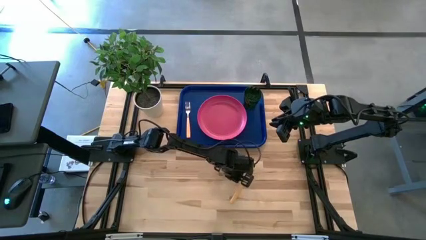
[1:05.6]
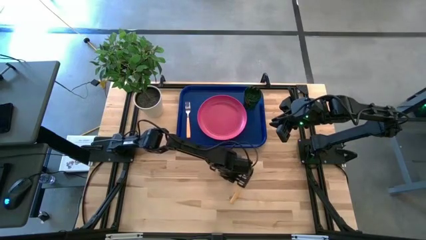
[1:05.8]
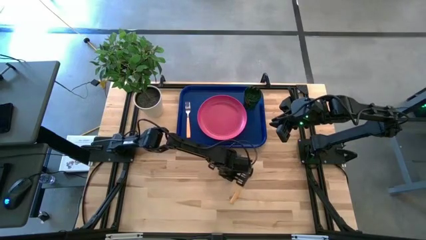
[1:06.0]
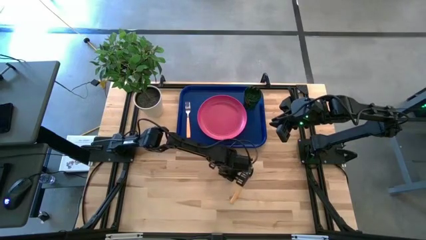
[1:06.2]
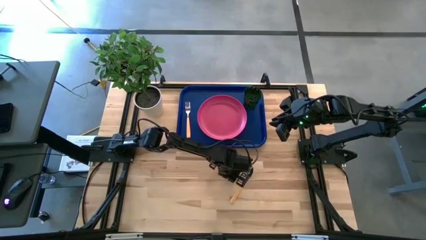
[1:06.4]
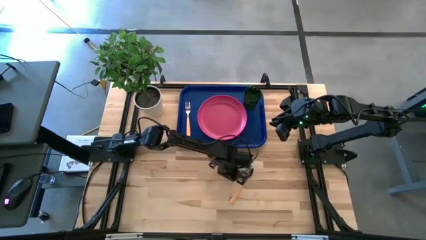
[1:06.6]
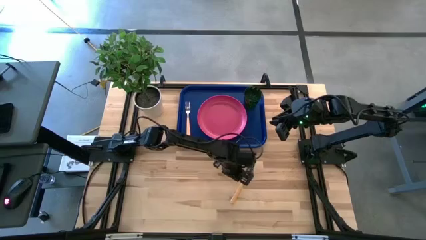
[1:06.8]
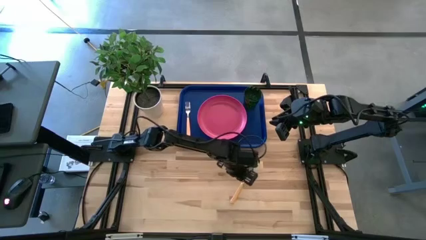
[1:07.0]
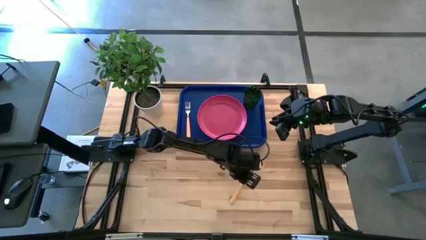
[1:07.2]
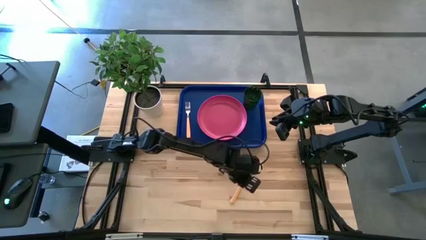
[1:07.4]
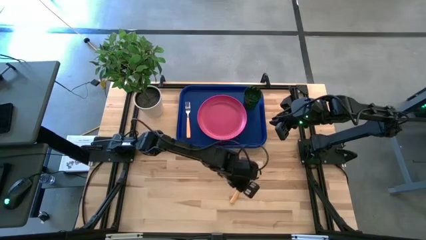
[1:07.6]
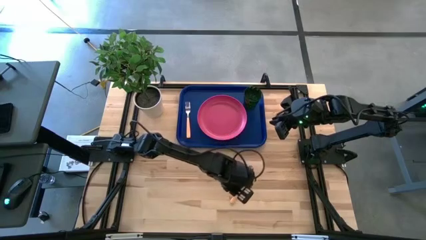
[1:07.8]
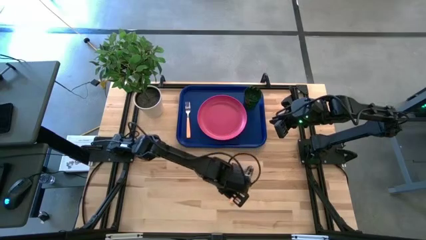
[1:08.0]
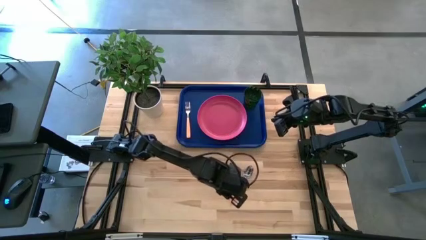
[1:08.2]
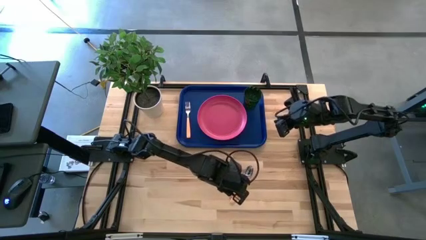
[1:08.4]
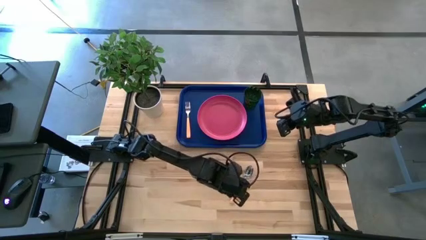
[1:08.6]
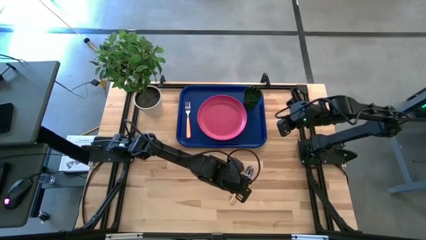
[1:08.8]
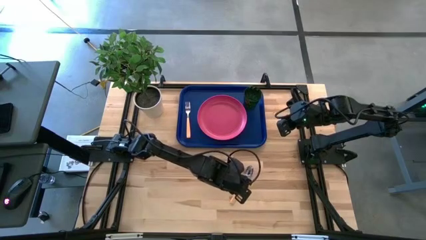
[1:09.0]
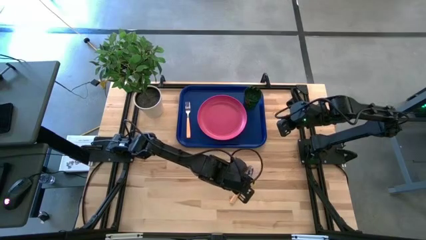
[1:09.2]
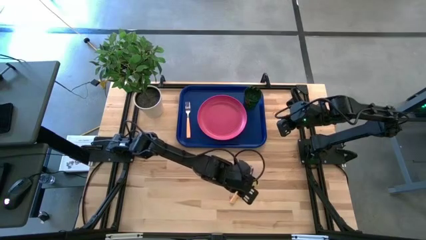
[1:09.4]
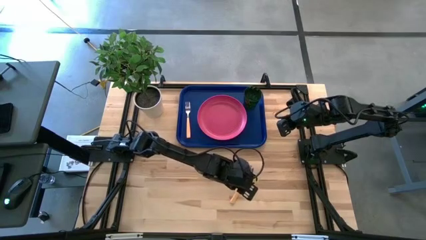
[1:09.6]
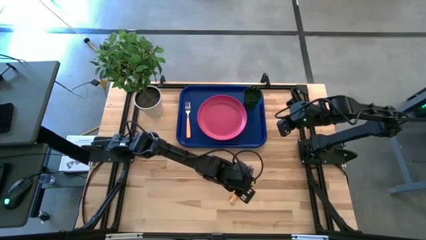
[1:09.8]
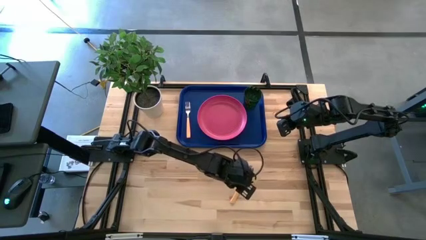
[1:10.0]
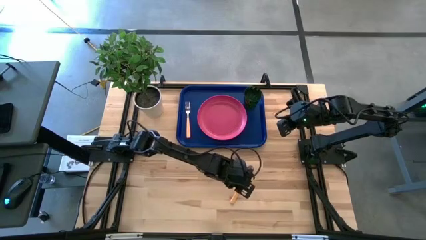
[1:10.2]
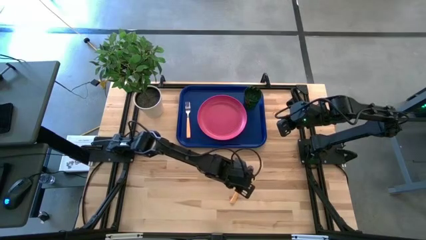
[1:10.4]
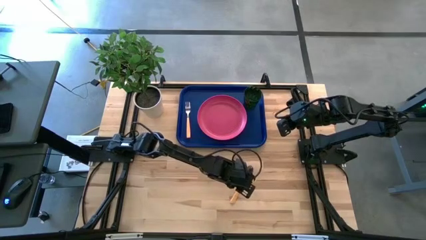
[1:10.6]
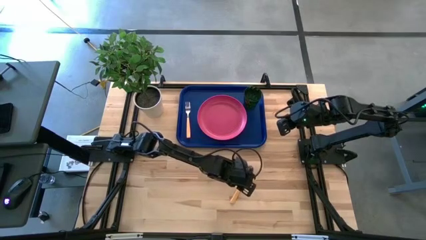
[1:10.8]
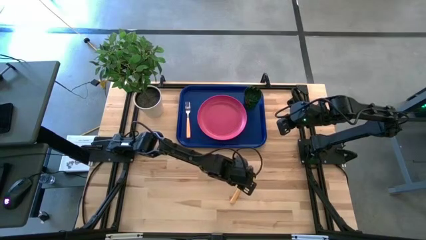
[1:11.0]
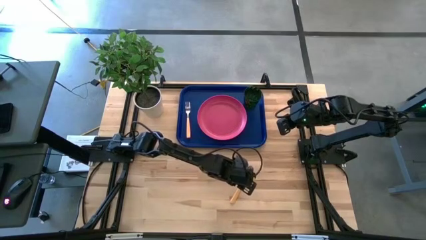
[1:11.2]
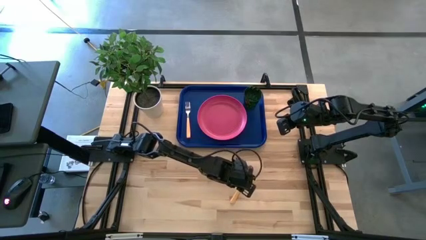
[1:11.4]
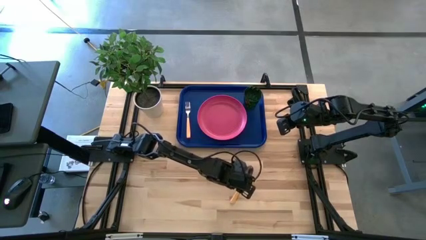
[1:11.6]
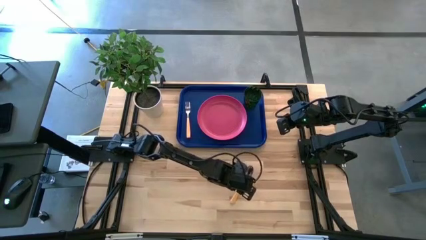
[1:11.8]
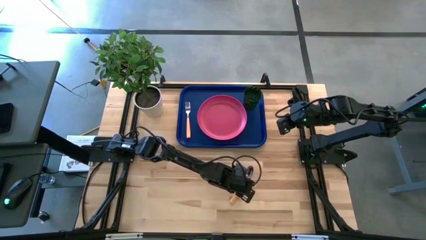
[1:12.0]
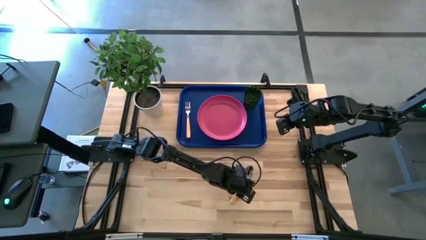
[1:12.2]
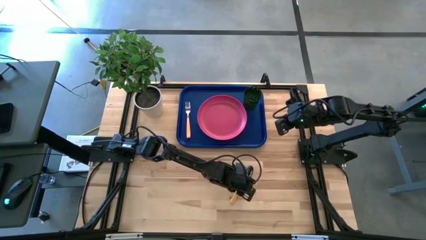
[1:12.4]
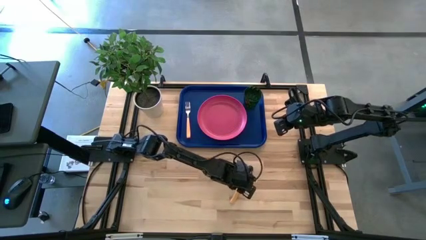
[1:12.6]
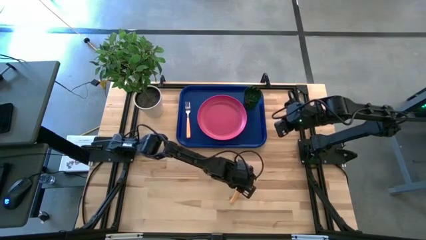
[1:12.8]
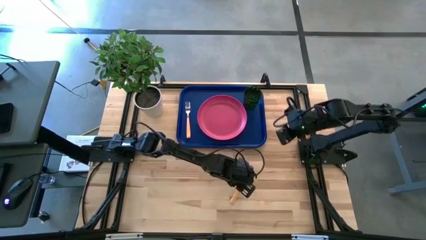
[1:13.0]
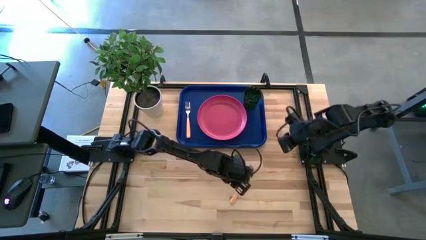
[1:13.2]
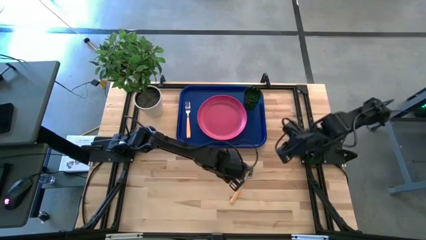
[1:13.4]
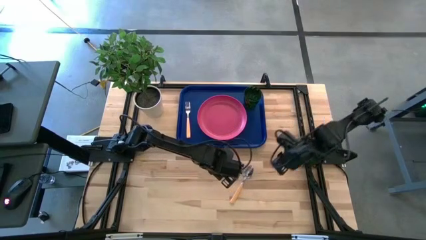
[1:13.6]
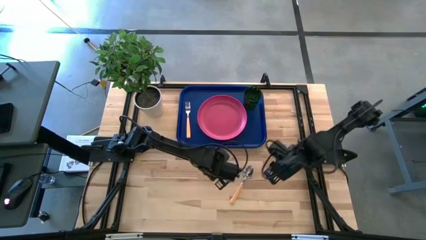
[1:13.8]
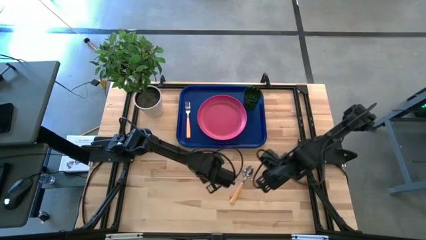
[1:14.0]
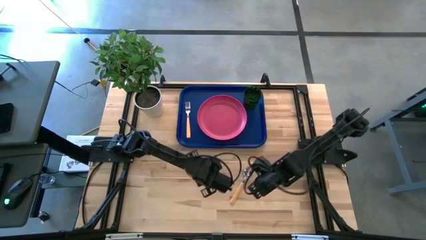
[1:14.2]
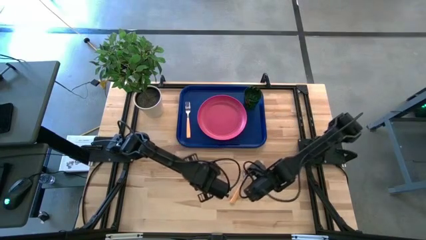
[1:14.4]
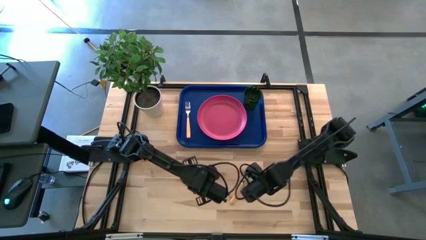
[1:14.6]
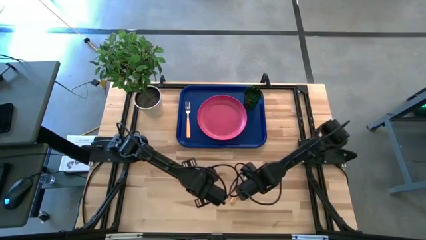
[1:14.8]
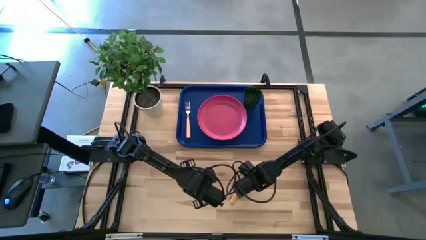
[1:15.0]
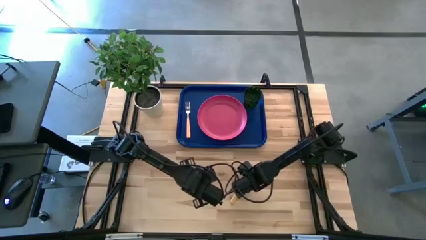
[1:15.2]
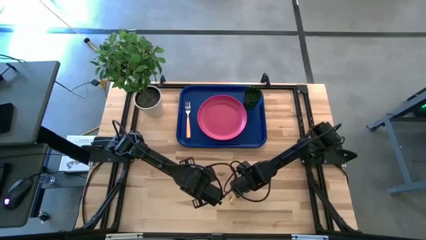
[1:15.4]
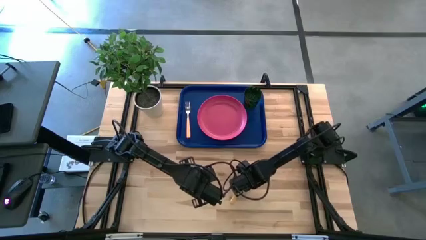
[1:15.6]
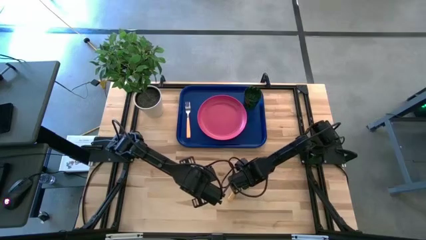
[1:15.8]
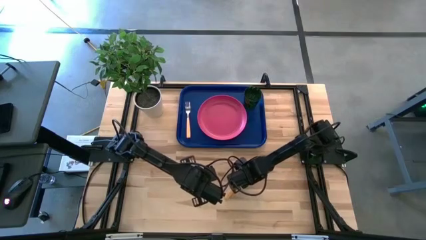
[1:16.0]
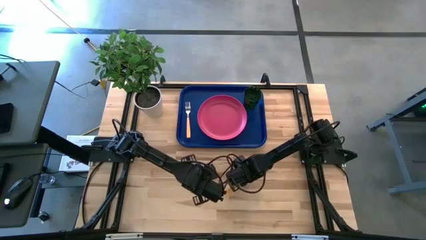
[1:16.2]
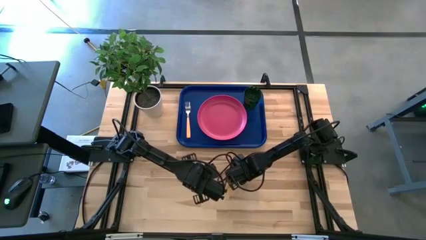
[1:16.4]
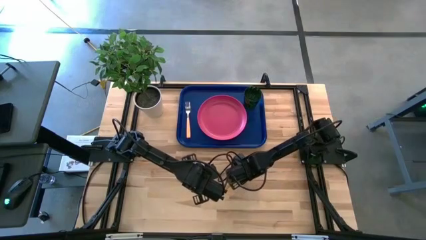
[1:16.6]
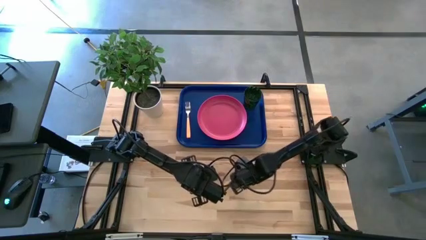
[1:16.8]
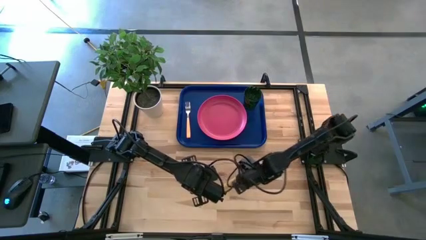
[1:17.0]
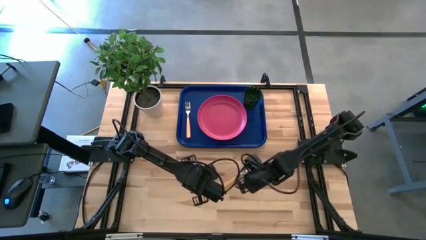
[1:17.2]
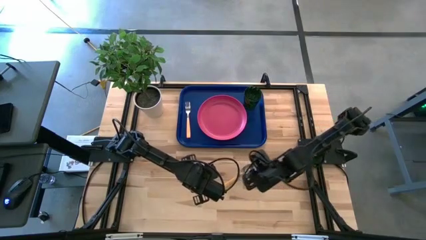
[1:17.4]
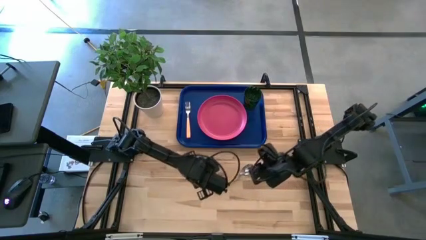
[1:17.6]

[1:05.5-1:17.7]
Task: Pick and place plate/cup/fork/spoon on tray
Put the yellow spoon on the blue serving tray

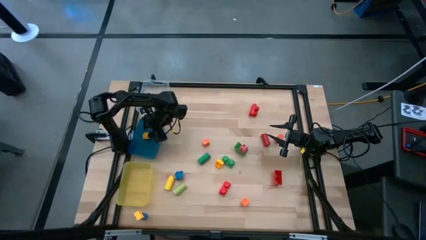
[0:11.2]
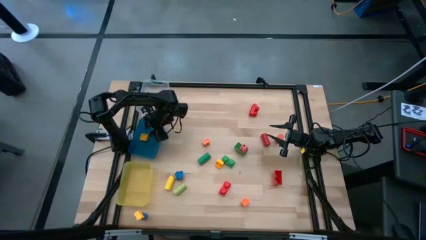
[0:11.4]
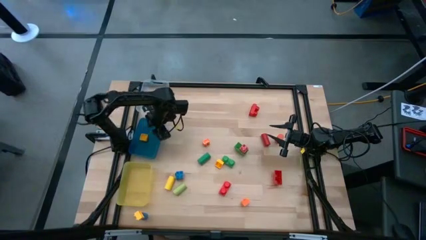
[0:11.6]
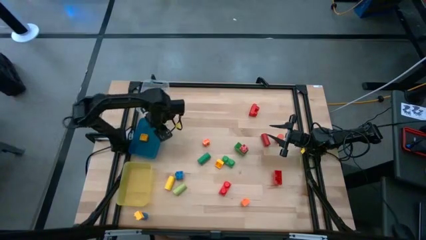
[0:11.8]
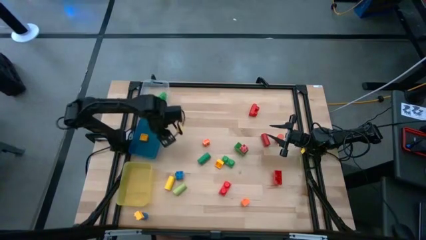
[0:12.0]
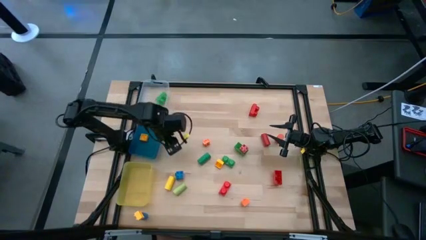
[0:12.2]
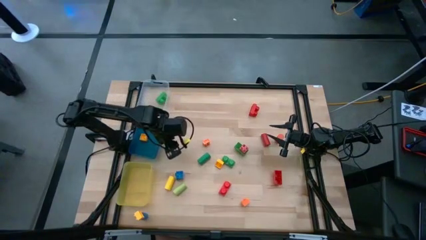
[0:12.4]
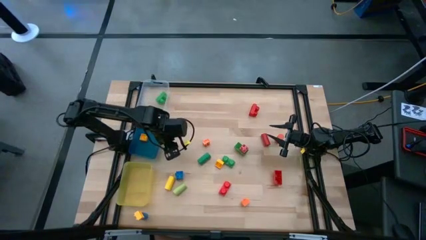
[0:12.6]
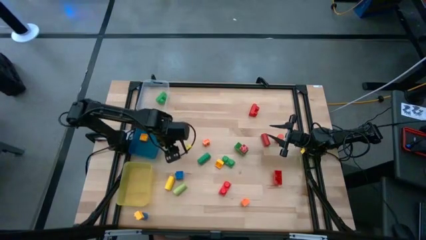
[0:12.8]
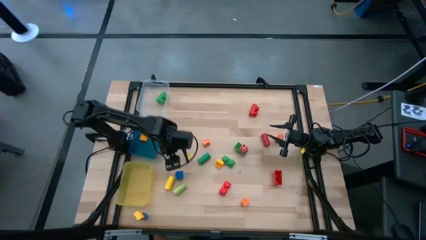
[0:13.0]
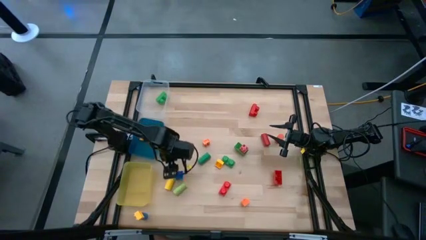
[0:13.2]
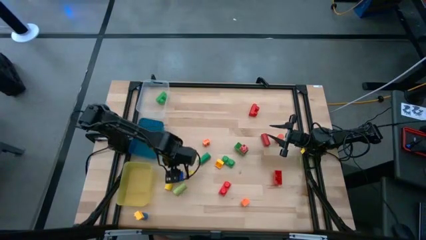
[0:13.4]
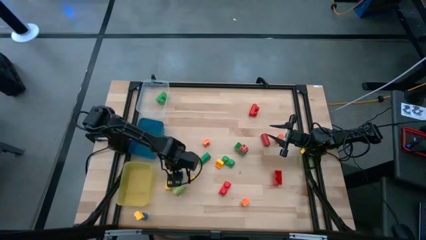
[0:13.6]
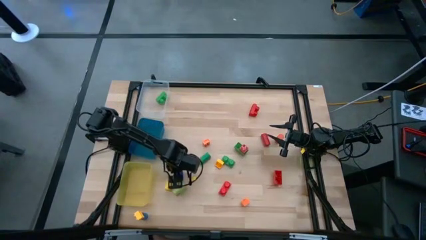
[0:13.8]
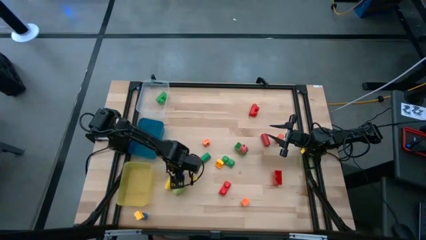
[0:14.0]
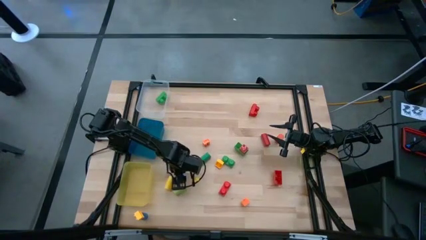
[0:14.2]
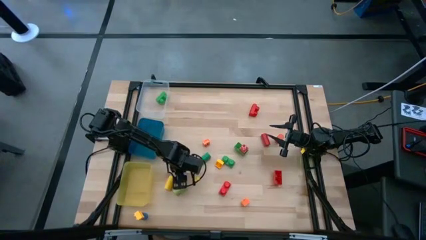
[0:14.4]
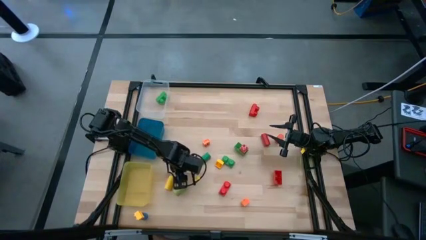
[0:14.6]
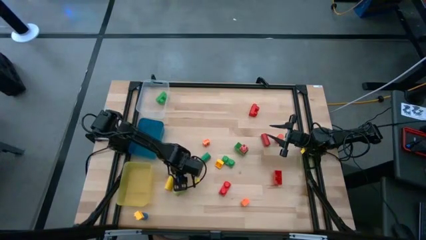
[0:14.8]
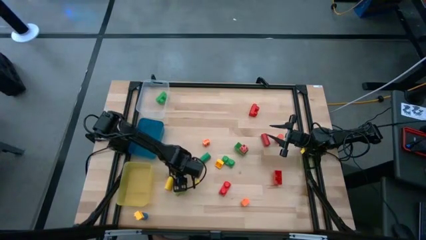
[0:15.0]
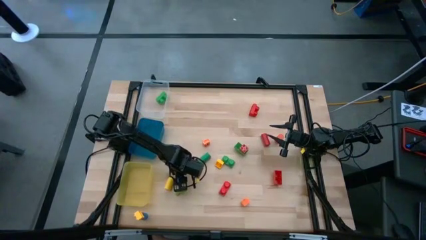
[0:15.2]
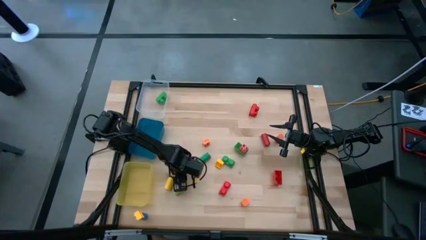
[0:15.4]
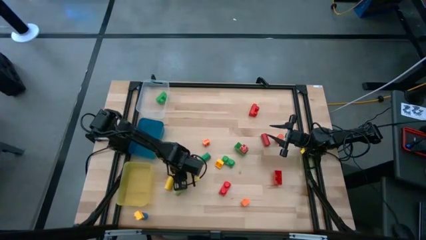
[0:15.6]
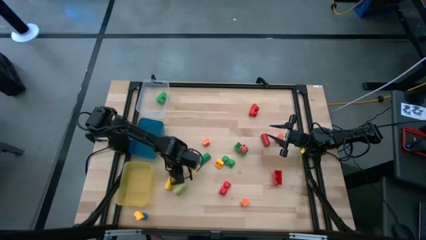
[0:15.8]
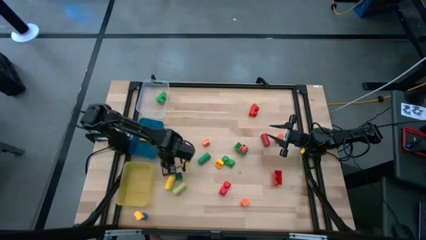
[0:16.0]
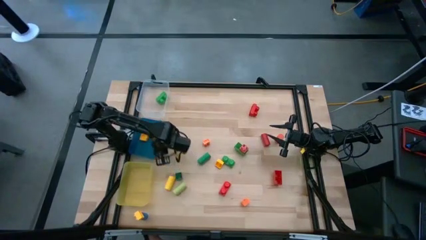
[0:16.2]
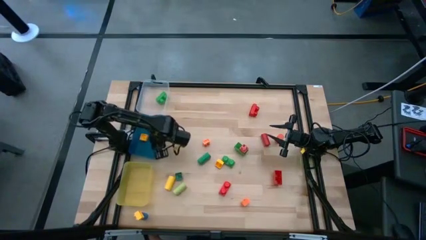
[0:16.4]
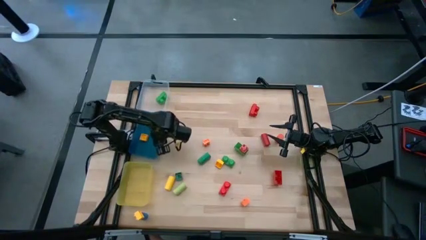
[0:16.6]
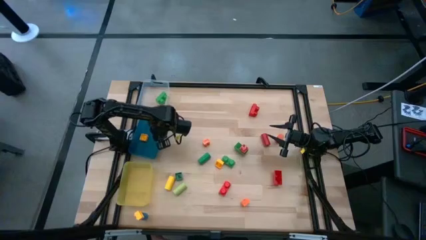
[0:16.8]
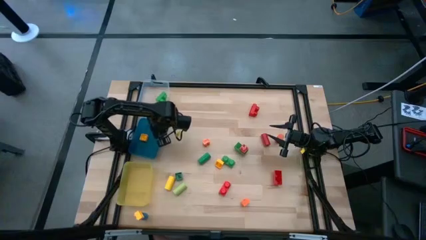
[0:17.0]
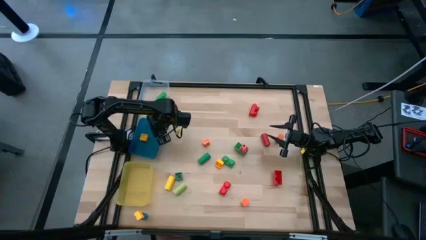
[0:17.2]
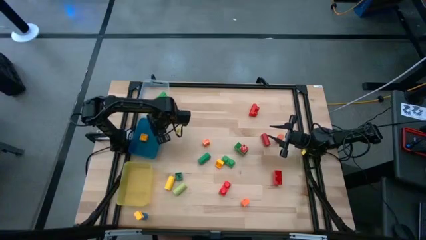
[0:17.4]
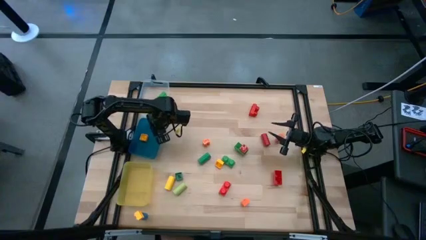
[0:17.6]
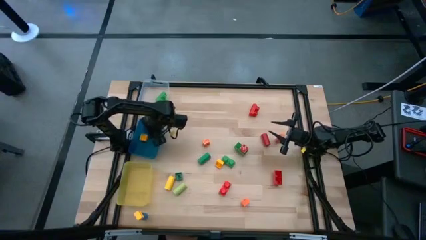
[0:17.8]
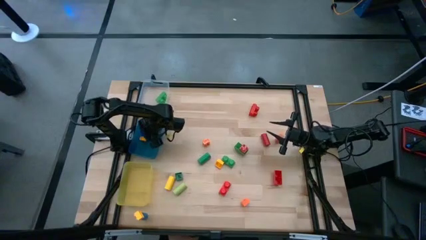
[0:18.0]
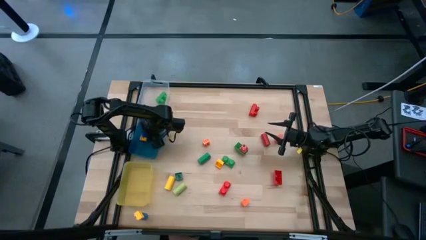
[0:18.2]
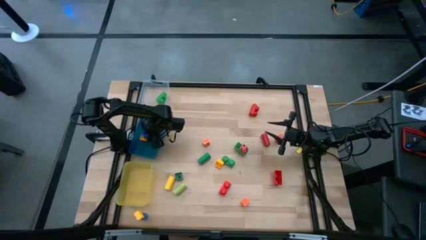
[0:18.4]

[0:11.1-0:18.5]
Task: Sort blocks by size
Put the blue 4 stud game piece into the blue bin
